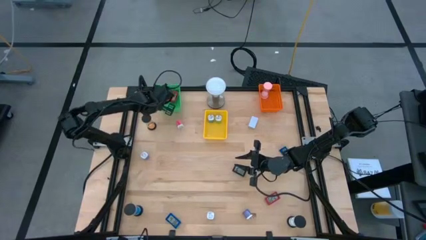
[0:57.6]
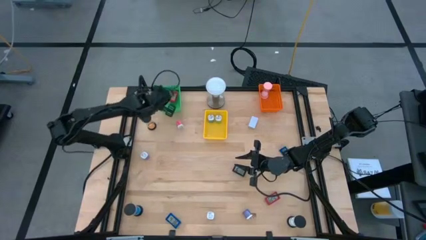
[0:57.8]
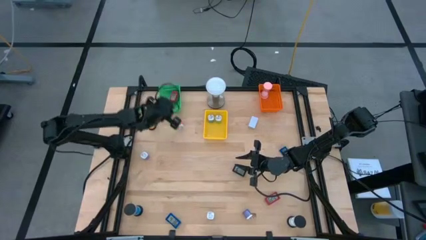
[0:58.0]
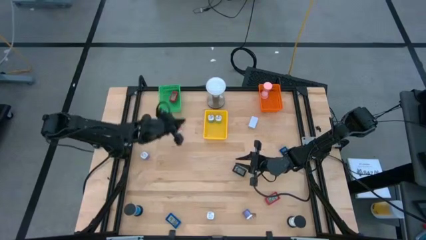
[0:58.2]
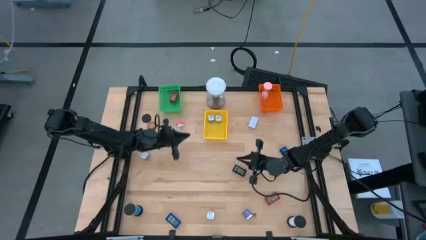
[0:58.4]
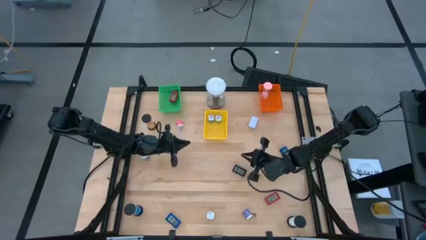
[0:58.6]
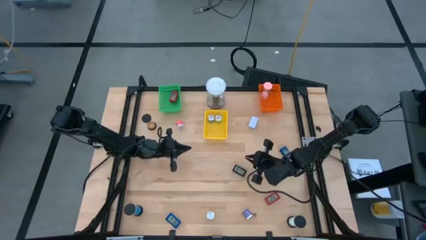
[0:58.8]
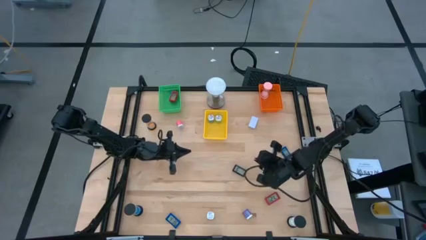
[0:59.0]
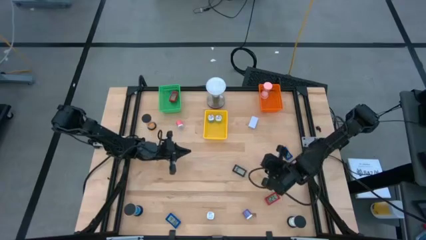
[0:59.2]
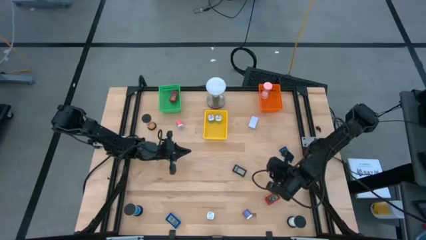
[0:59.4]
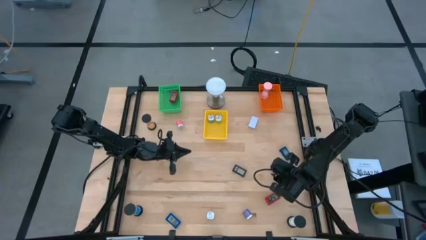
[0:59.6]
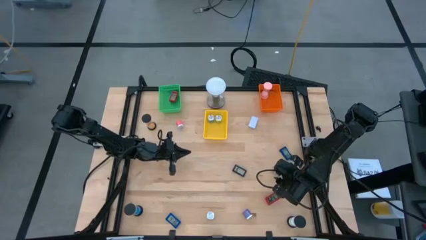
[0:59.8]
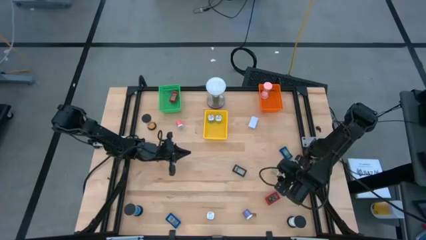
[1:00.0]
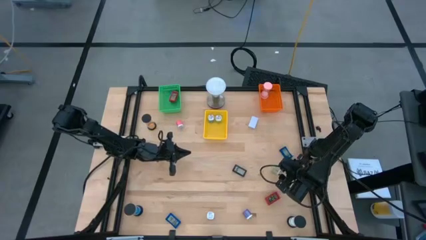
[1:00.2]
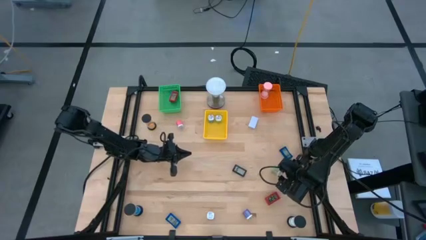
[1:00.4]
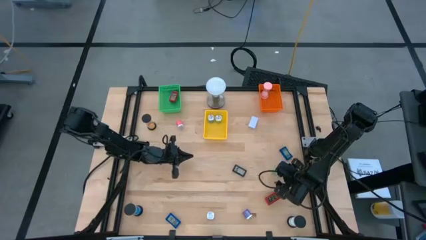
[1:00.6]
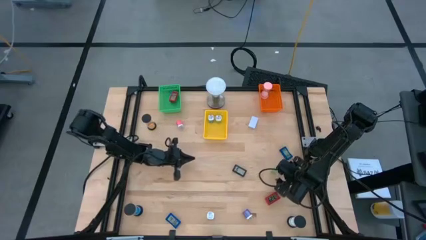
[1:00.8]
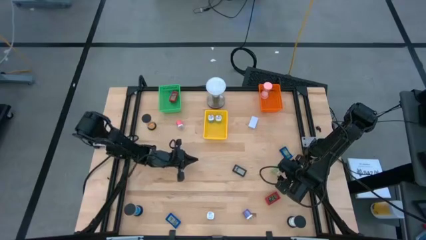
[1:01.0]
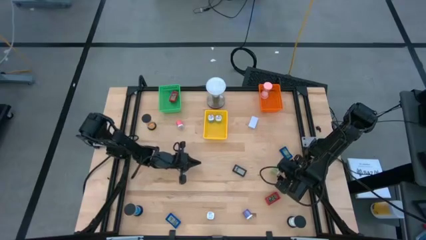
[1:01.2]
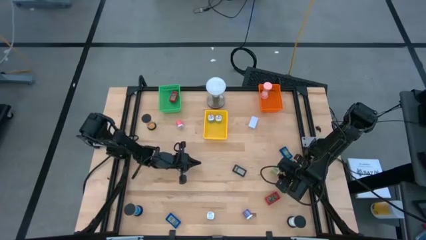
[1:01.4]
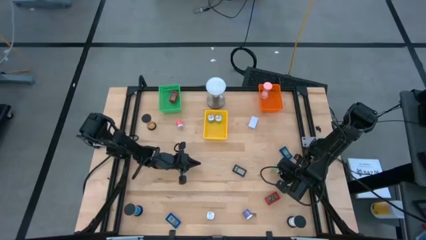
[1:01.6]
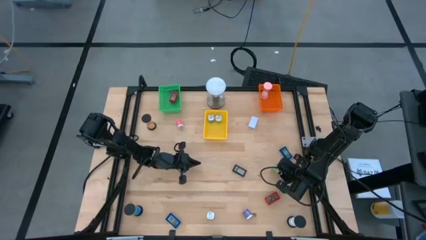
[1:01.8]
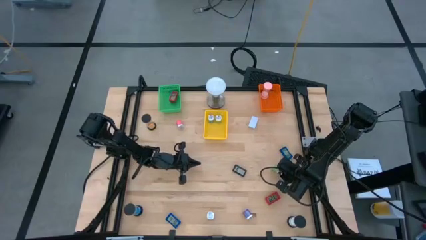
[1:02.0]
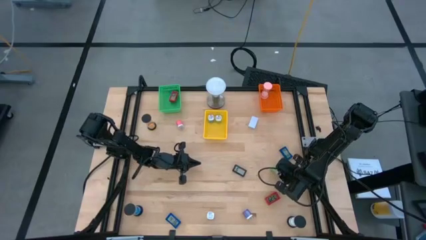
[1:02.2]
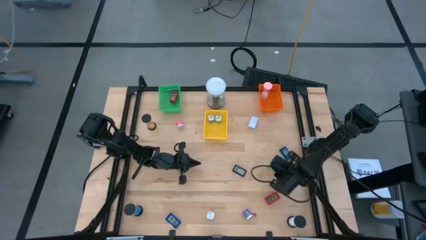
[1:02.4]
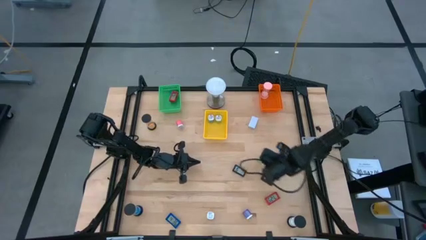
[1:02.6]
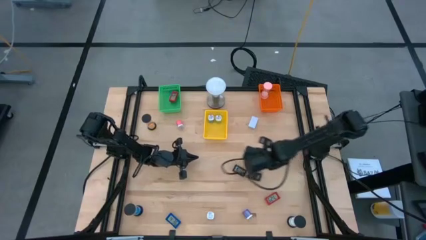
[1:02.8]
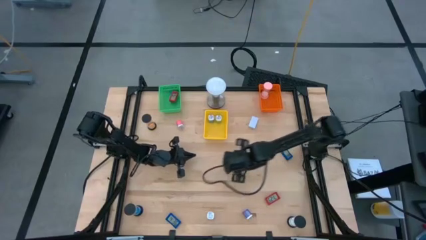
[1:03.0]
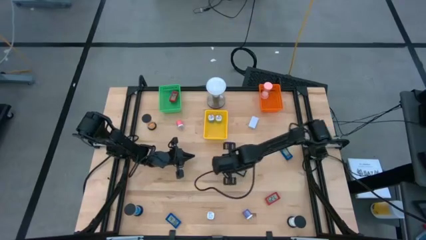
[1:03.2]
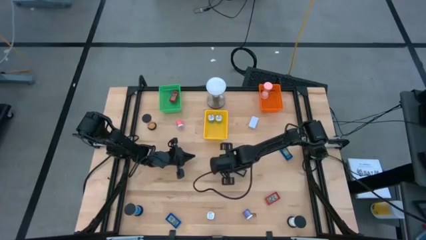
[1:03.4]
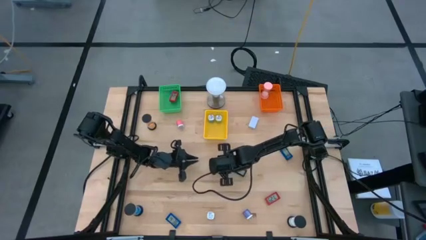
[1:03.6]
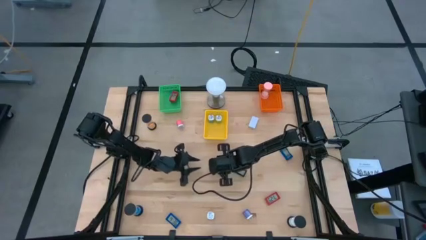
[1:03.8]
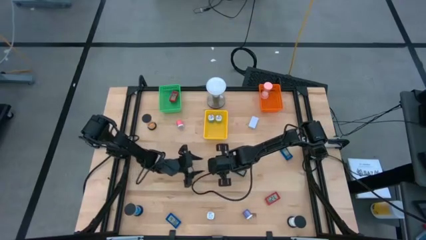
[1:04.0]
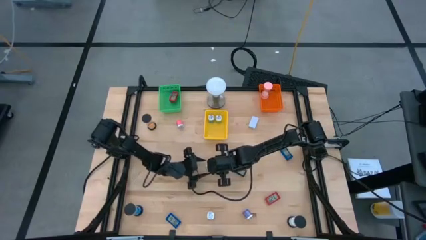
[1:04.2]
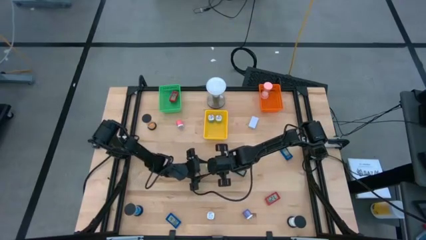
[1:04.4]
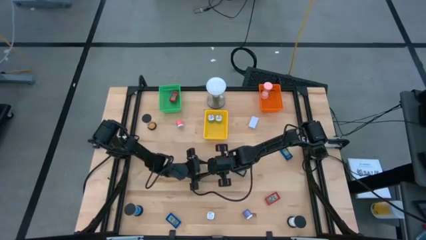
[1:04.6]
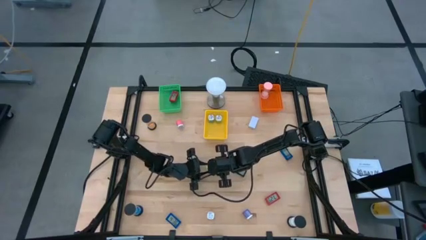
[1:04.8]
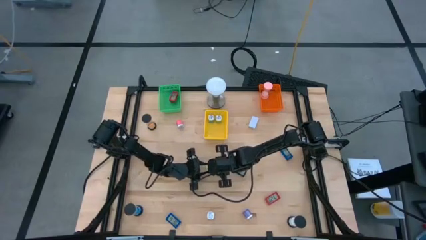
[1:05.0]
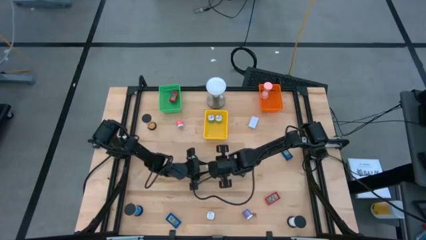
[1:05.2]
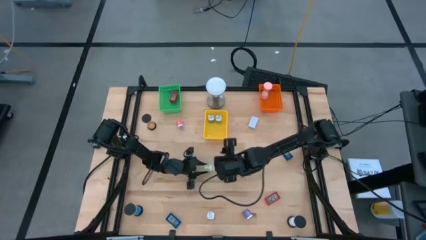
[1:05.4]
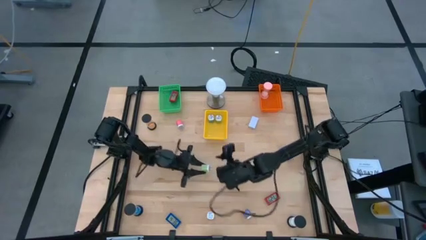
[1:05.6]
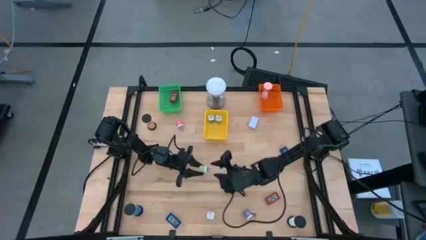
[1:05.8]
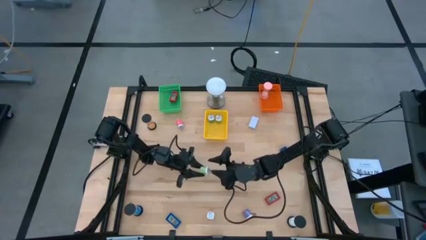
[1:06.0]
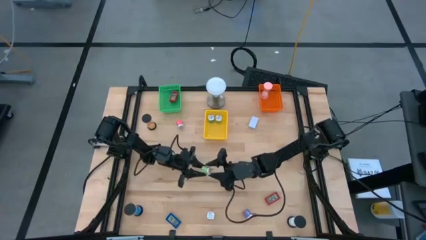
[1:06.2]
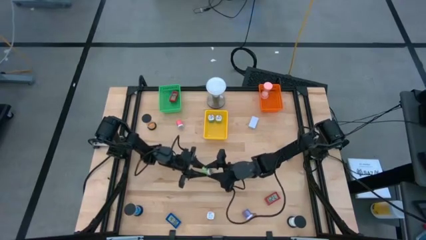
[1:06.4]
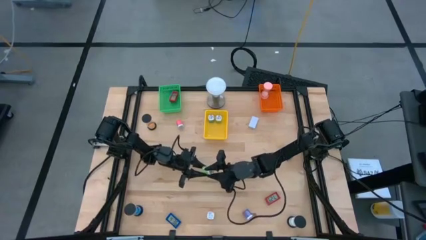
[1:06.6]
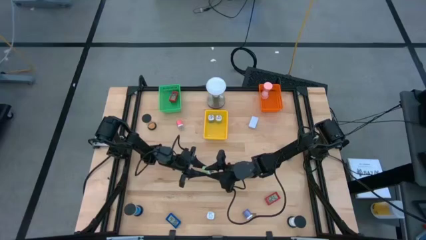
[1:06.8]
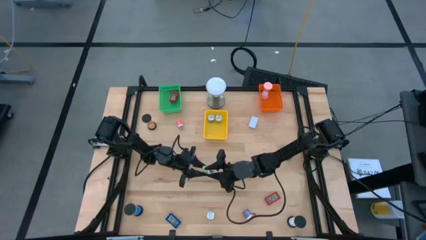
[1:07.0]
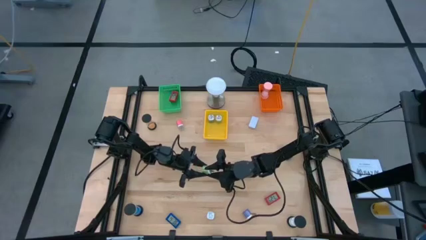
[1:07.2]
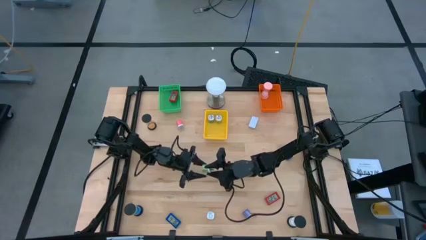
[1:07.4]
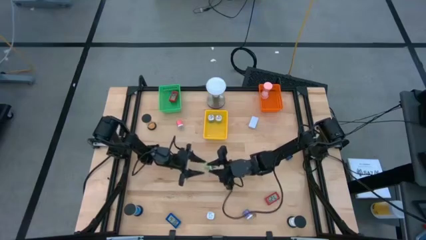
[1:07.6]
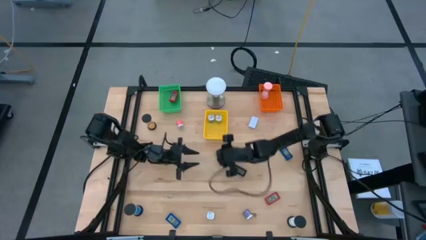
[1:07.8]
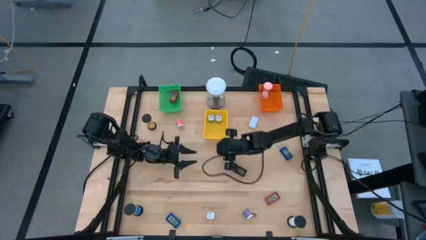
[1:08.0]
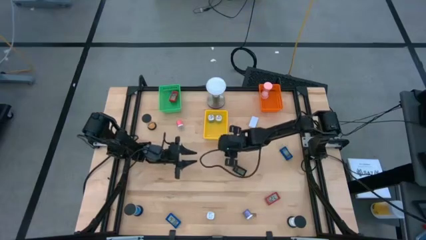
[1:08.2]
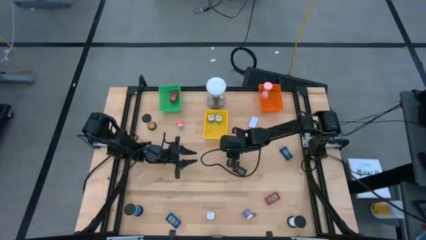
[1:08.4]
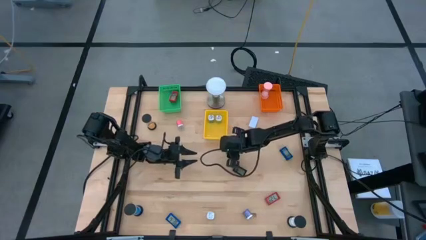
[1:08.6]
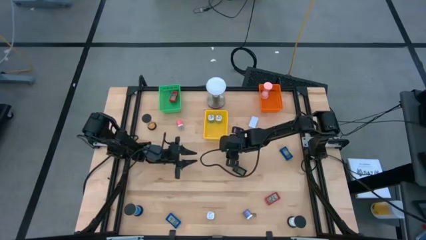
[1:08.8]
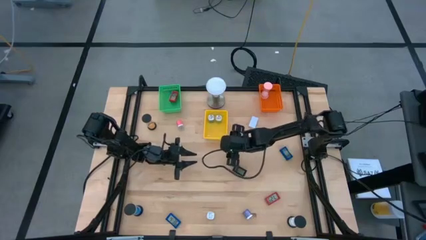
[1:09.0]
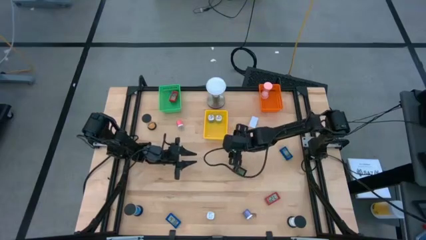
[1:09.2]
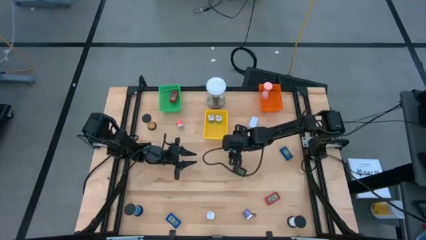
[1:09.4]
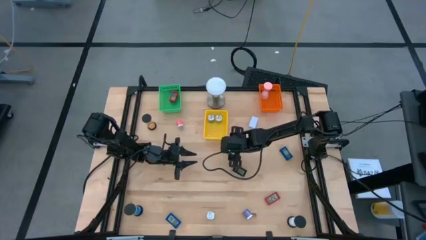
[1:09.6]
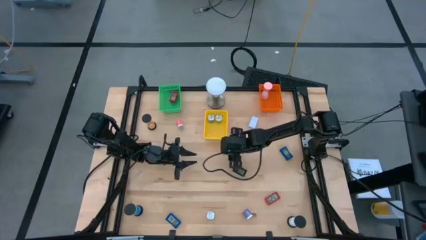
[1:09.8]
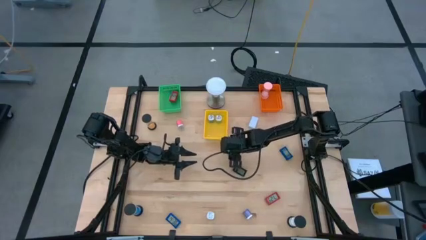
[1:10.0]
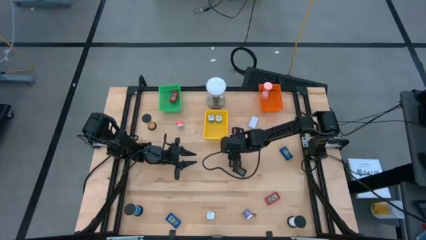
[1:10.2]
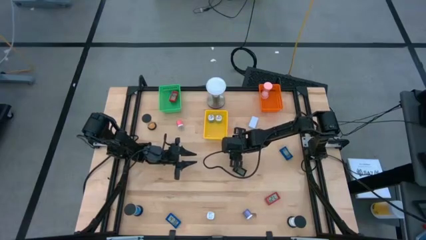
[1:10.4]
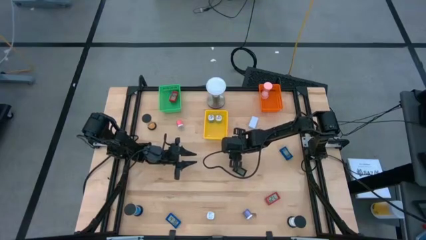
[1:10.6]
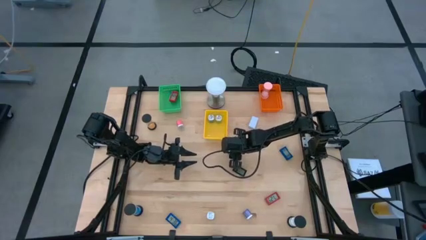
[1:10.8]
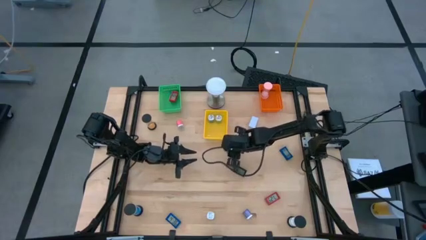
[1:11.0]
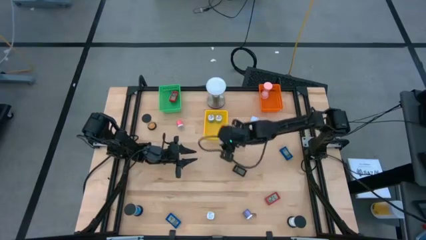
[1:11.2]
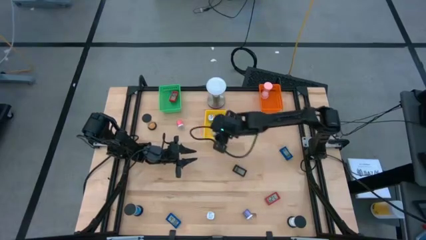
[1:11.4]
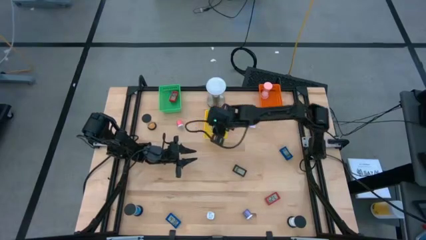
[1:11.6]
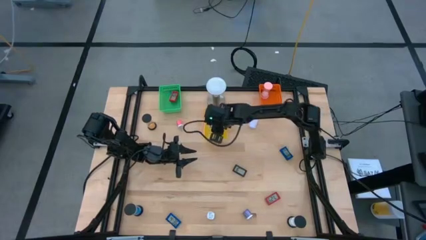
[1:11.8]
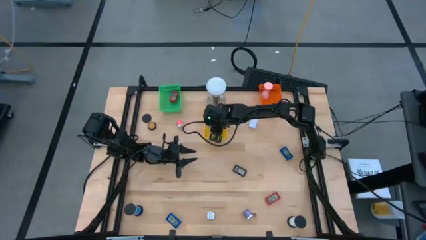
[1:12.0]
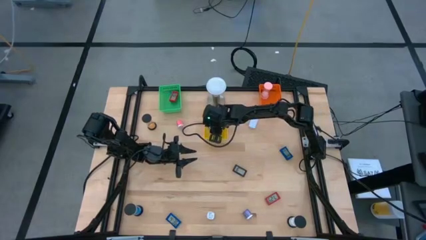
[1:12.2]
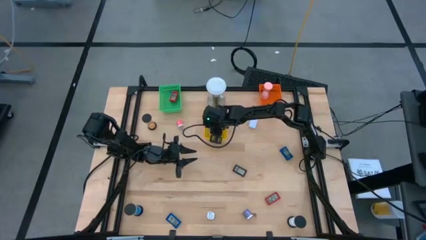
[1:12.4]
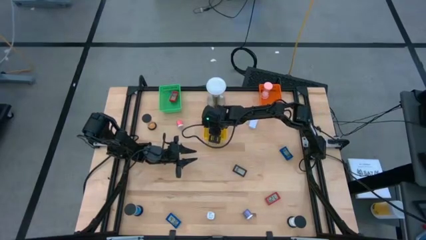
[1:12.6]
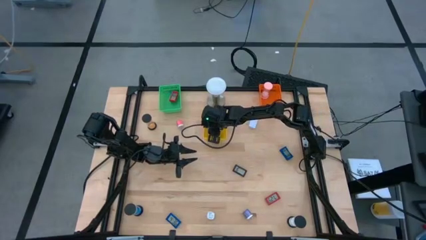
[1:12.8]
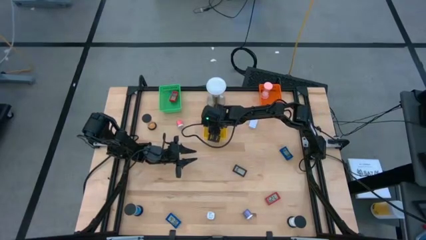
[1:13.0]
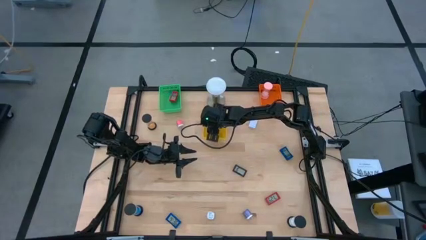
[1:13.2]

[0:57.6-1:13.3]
Task: Pick & Place Office items
Put the green charger adapter into the yellow bin

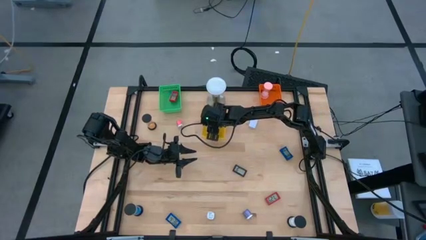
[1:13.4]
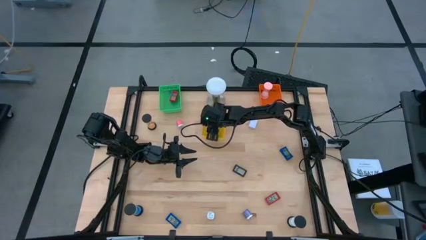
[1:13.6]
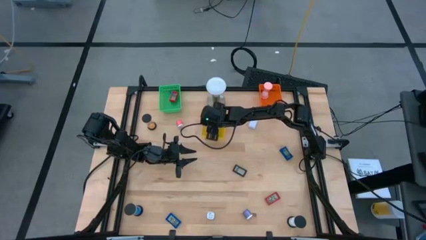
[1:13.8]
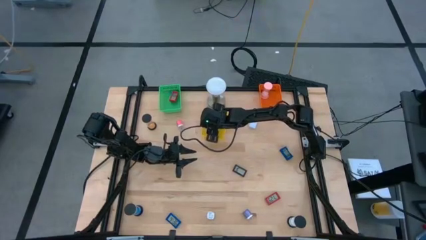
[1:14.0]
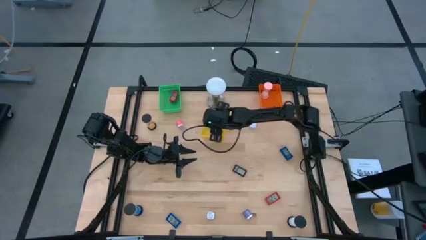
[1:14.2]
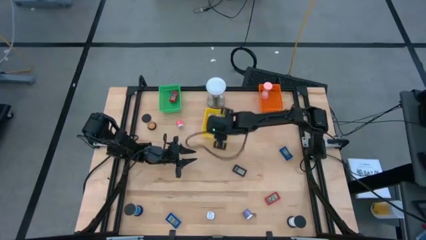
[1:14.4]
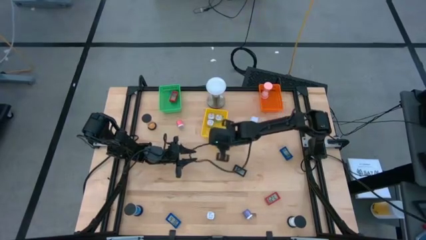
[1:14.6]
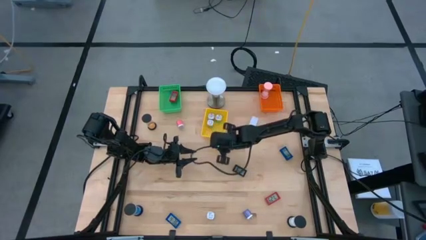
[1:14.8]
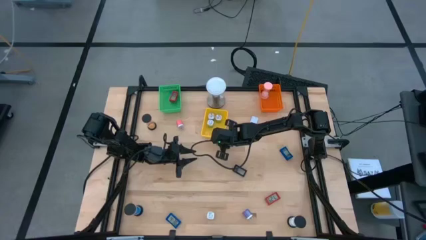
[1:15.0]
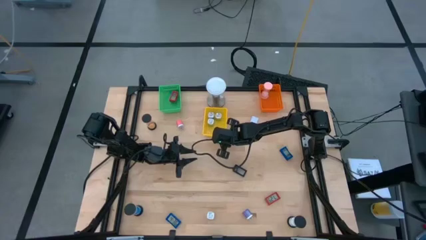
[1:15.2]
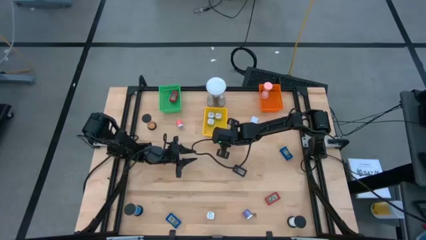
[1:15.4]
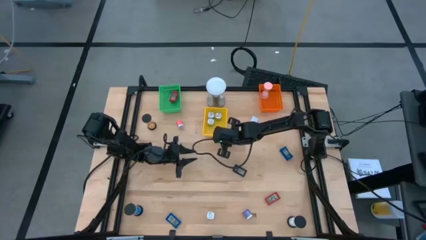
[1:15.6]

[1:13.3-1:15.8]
Adjust the yellow bin
